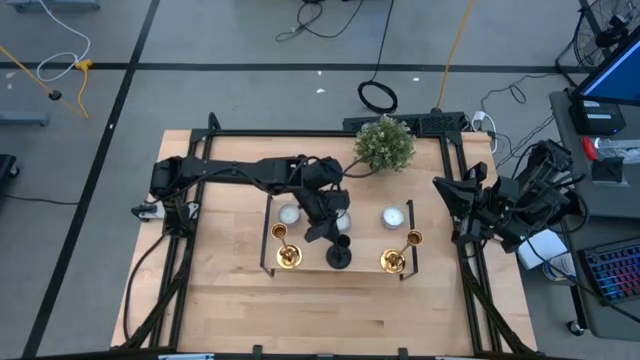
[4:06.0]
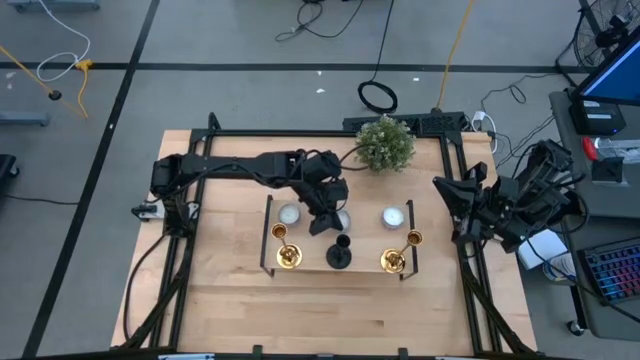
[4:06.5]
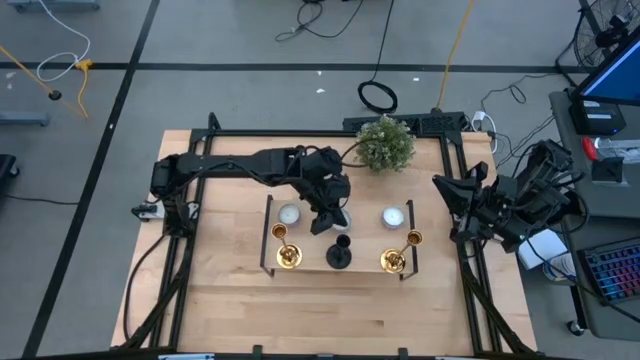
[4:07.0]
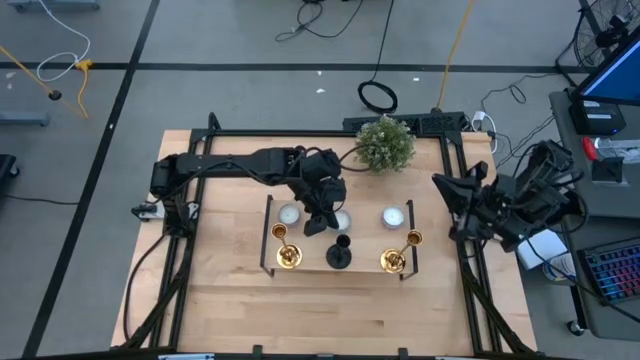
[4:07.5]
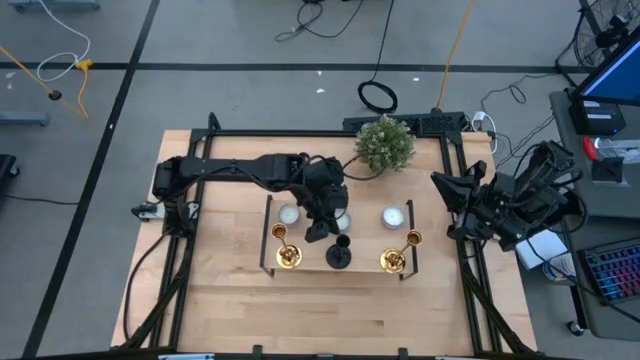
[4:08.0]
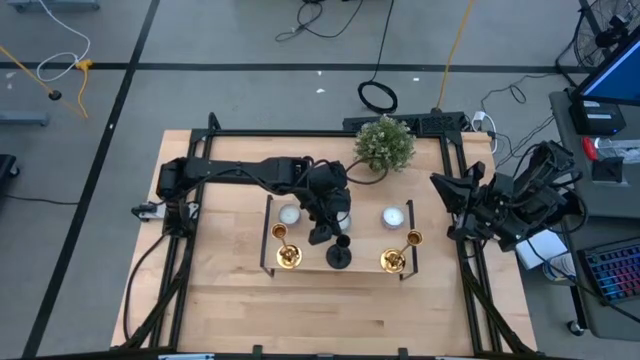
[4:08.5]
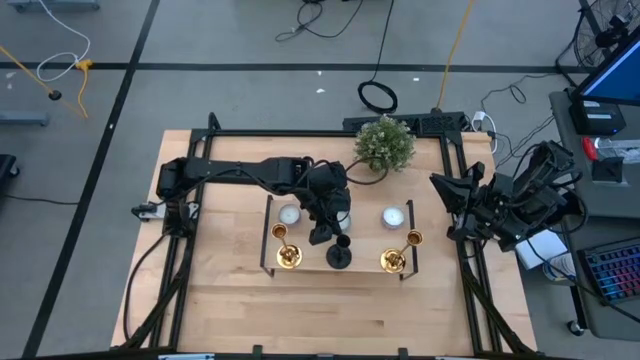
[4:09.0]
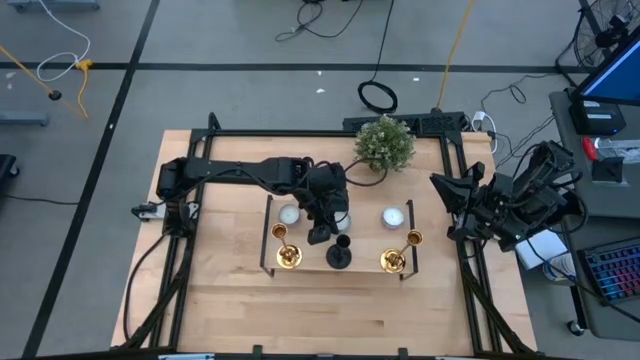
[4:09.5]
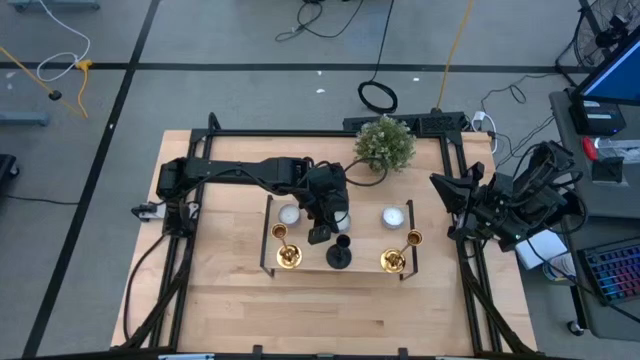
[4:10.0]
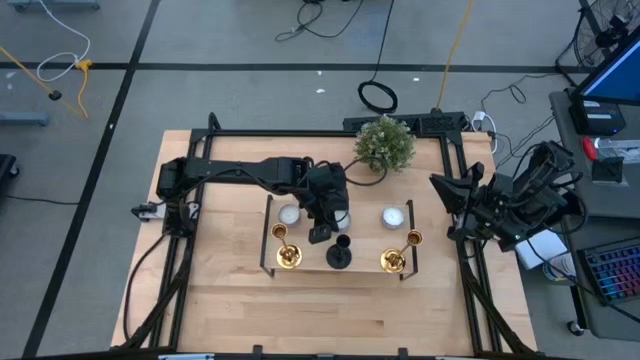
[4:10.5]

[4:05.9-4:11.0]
Task: Pick & Place candle stick holders
Adjust the white blue scented candle on the shelf

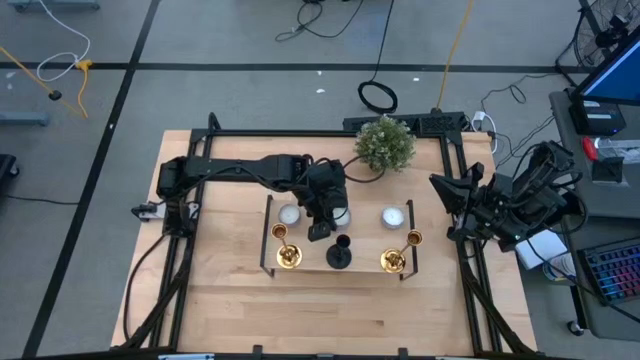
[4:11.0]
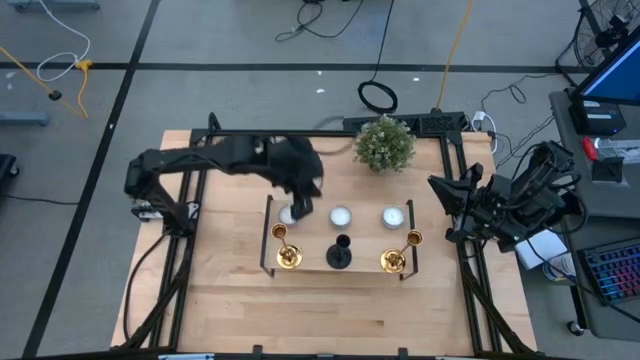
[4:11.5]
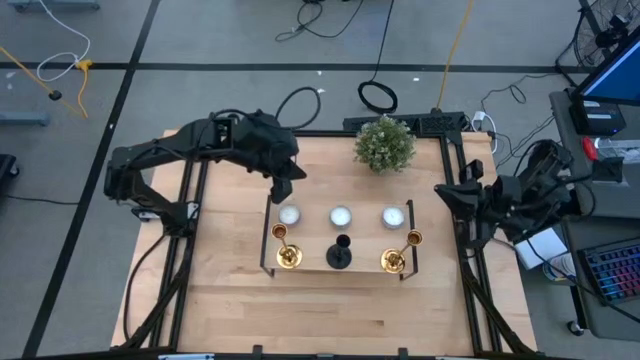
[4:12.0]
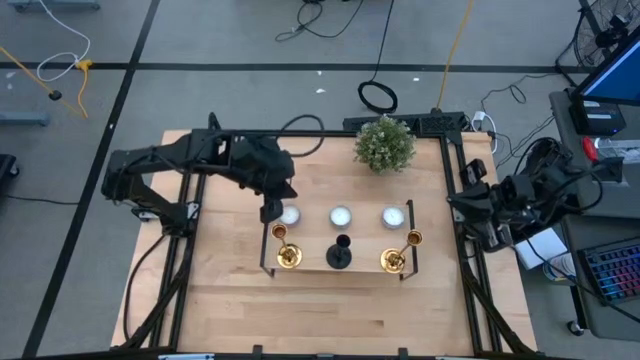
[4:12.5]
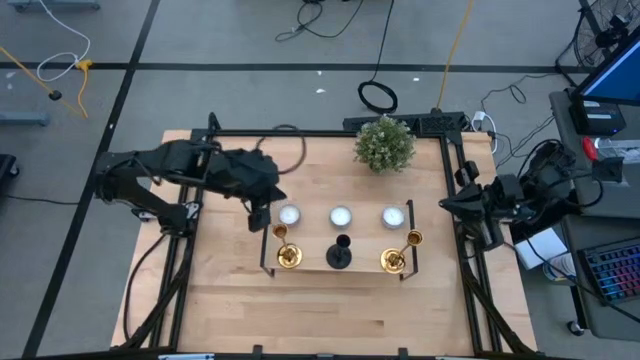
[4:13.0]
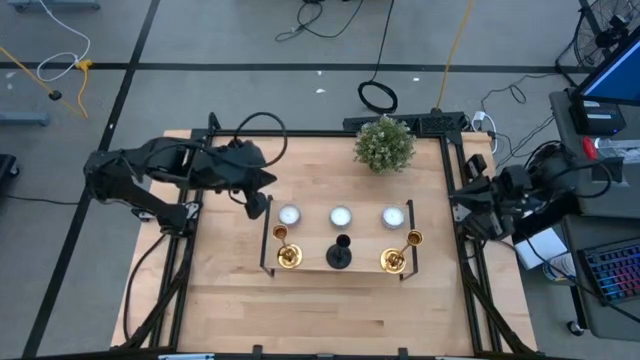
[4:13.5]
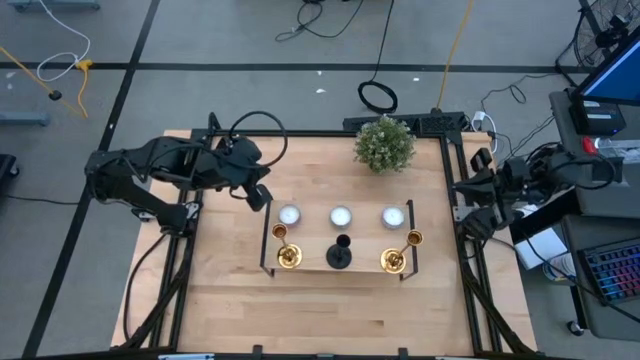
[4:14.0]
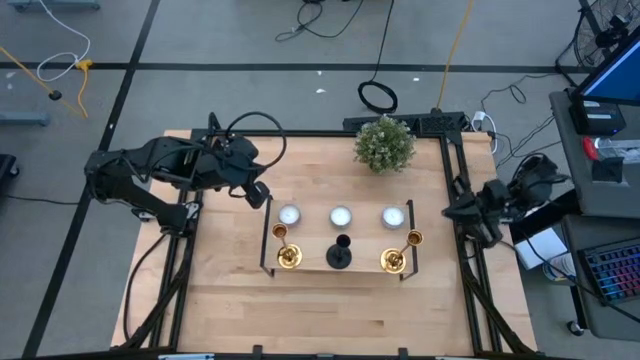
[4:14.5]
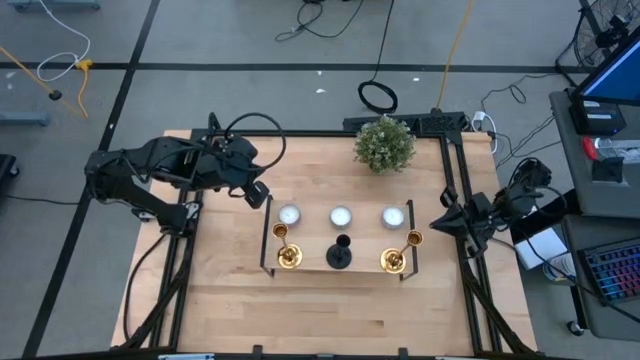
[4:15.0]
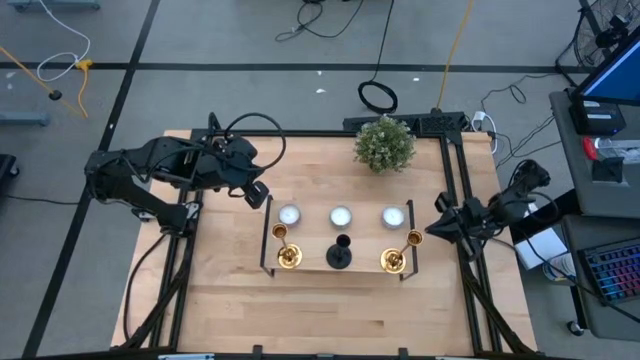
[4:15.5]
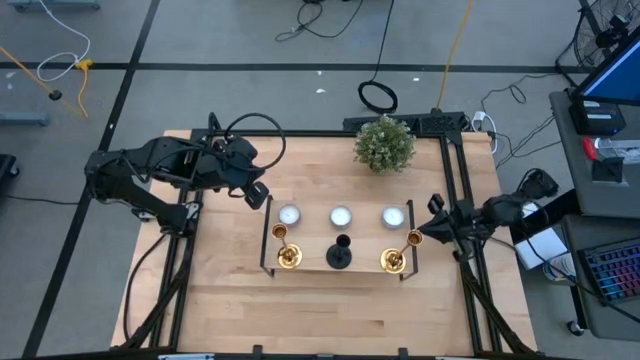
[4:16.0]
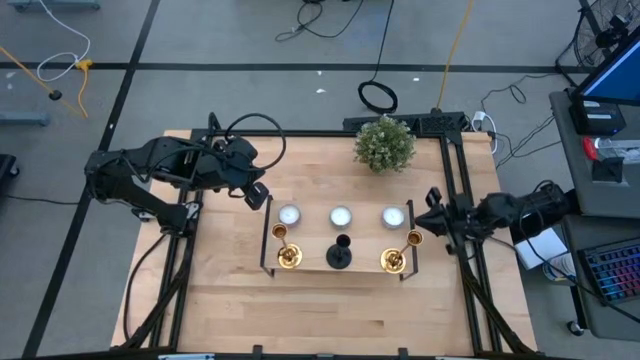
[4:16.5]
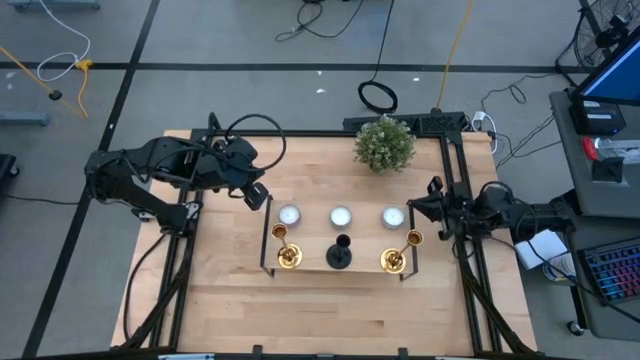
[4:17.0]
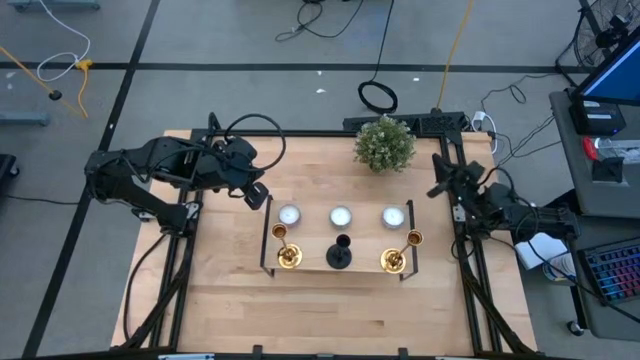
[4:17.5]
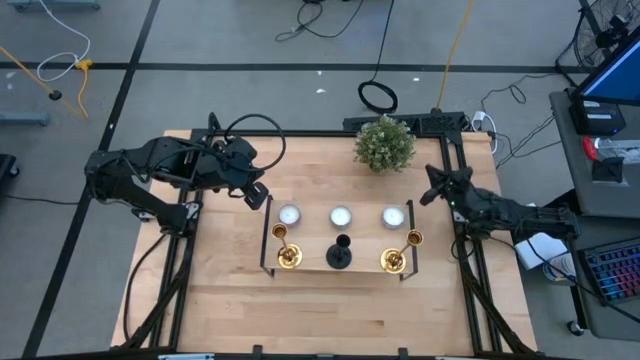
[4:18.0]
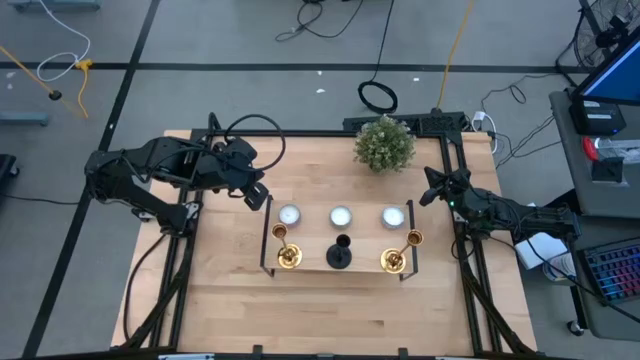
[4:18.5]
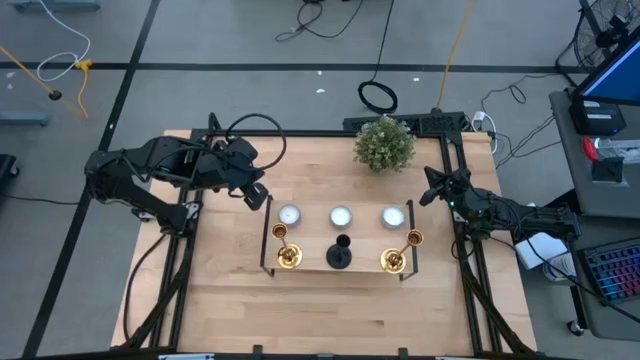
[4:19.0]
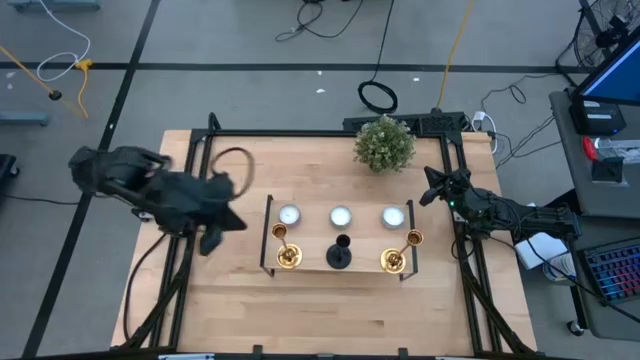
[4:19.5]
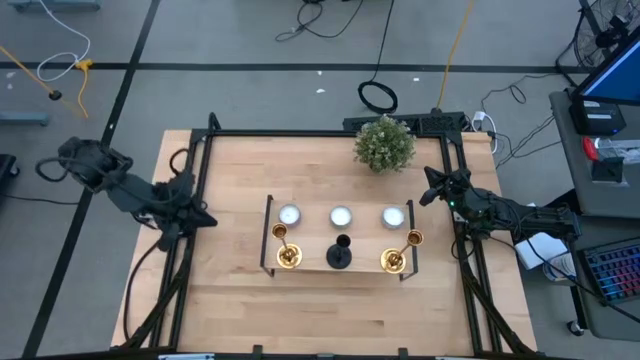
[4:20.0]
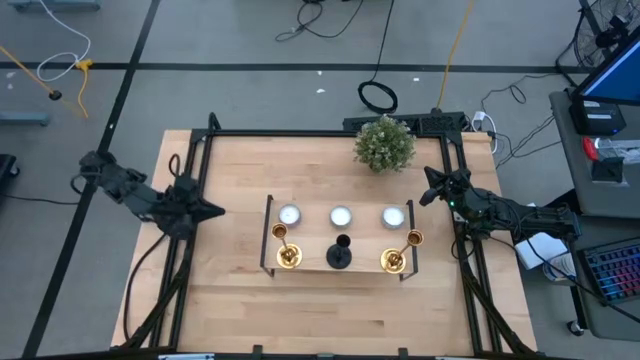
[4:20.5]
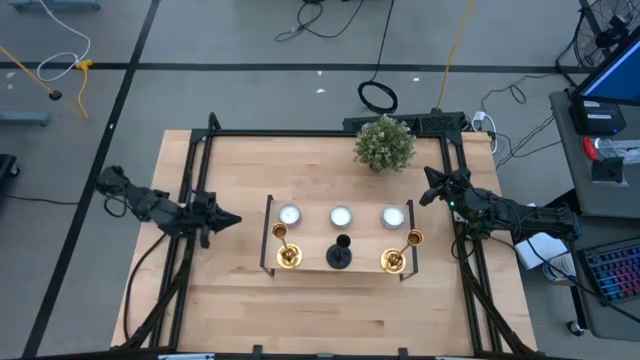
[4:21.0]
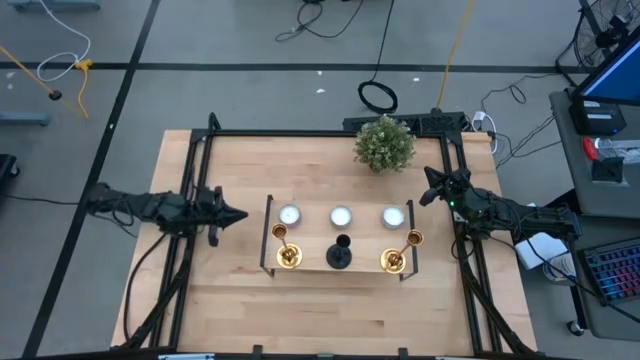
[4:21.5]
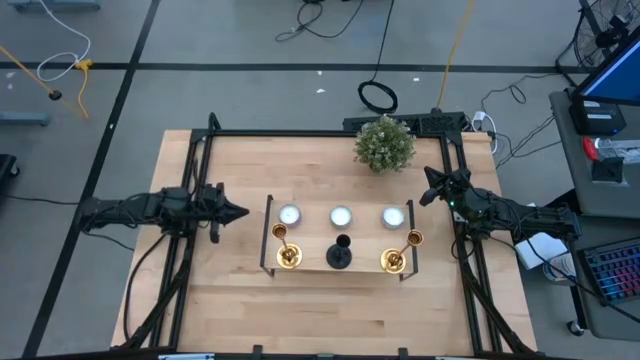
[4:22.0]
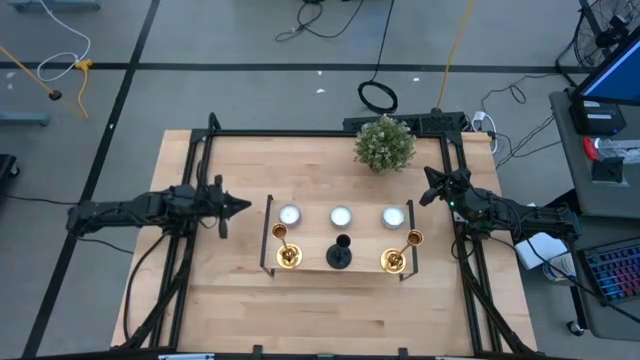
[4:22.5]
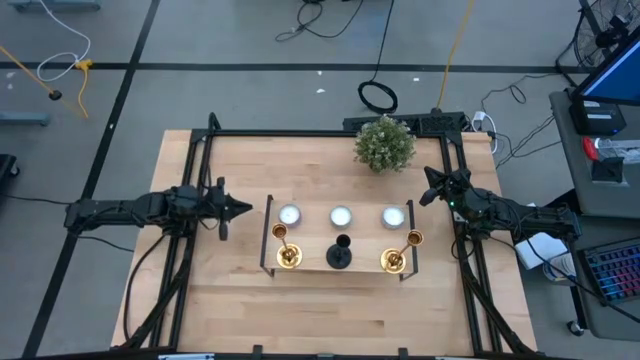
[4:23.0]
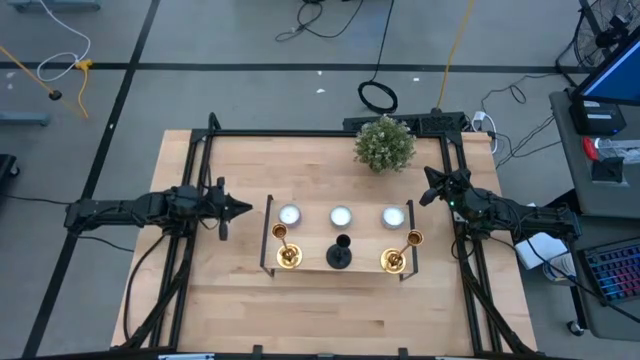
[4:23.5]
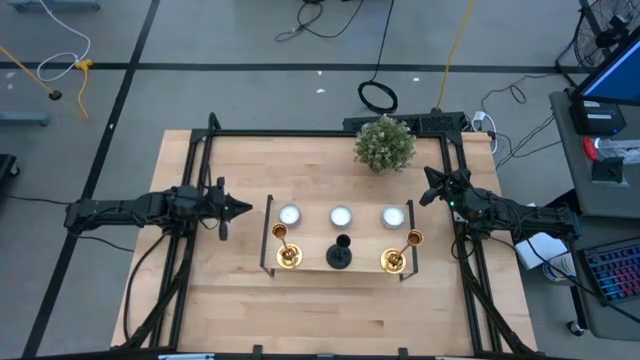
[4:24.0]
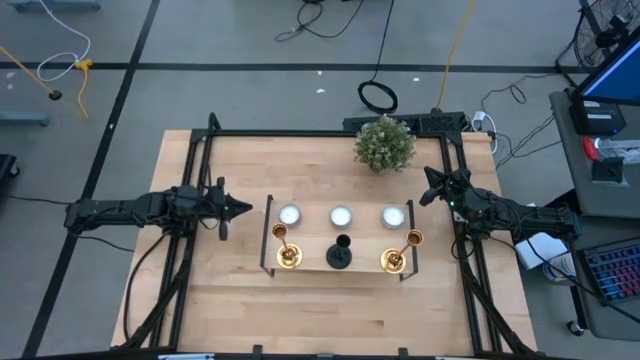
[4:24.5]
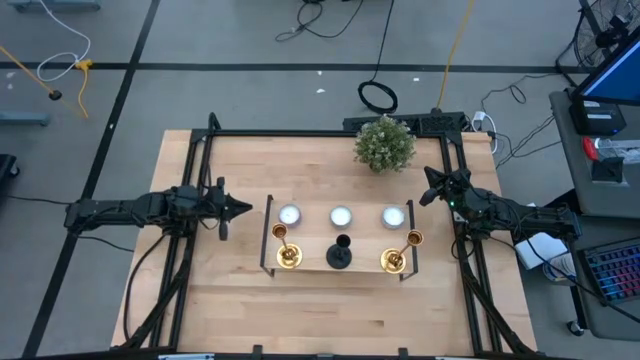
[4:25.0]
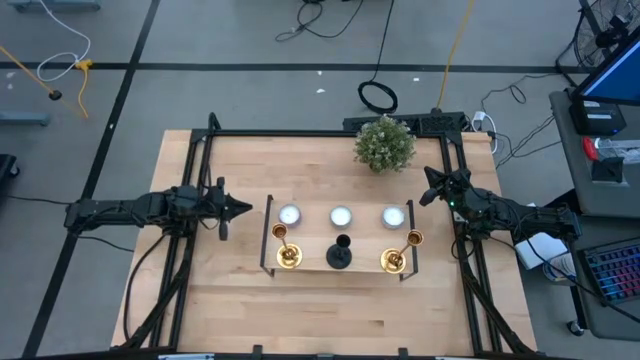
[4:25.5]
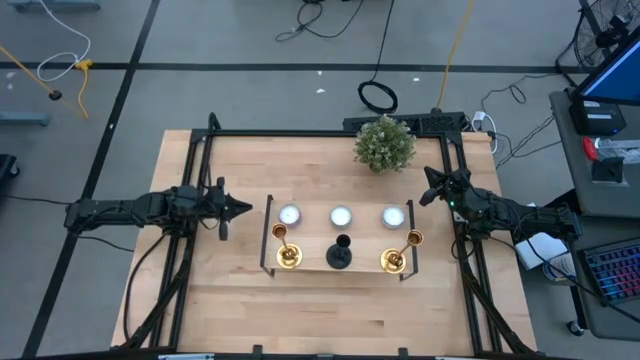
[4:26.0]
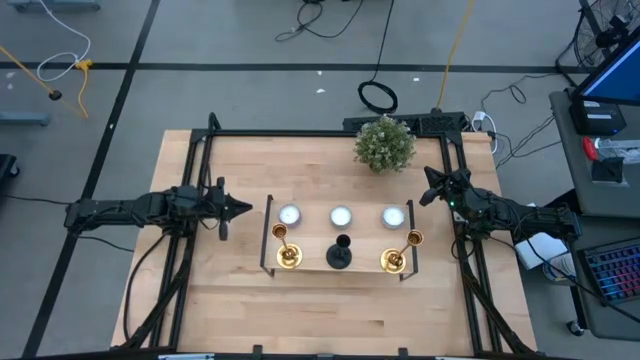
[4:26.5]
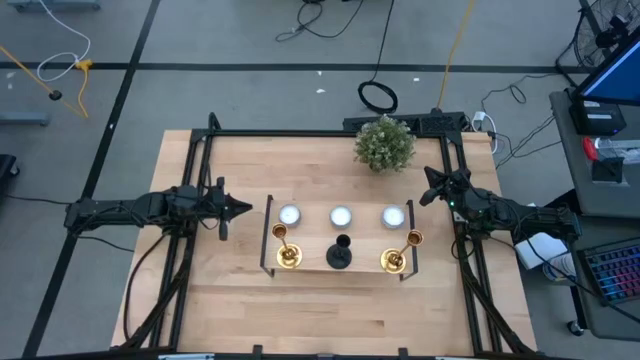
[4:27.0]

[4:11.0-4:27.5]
Return to Home Position
